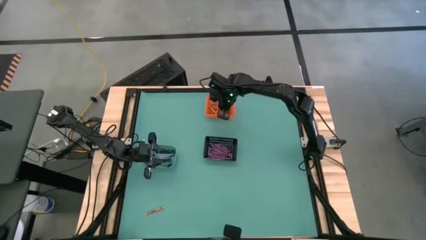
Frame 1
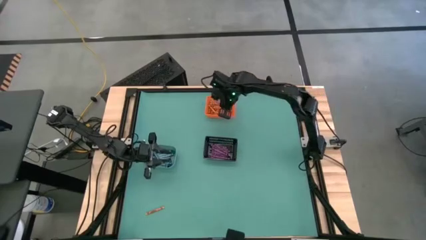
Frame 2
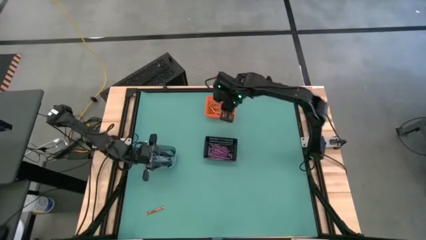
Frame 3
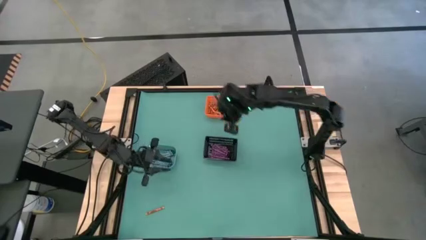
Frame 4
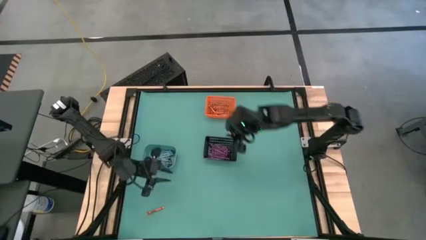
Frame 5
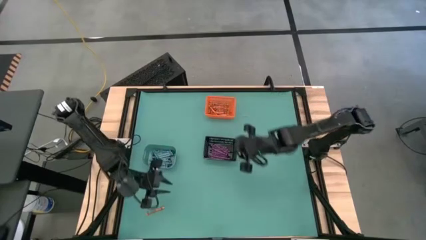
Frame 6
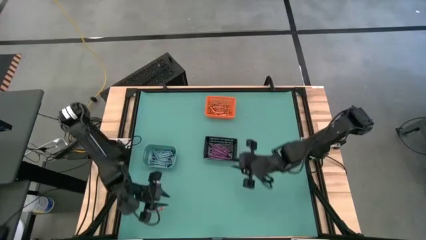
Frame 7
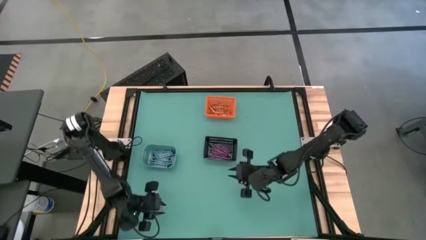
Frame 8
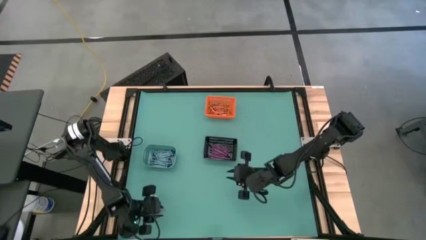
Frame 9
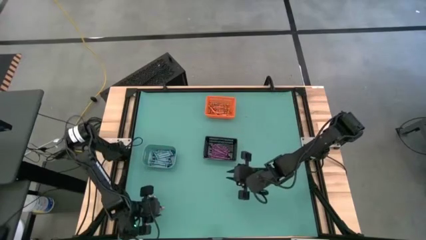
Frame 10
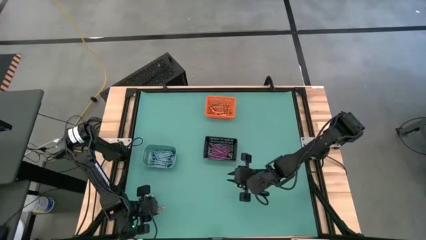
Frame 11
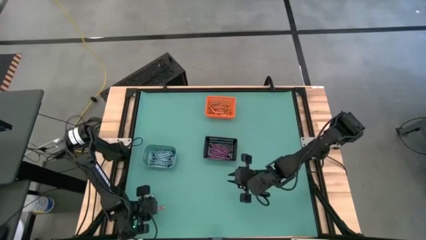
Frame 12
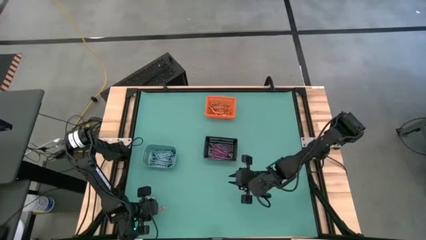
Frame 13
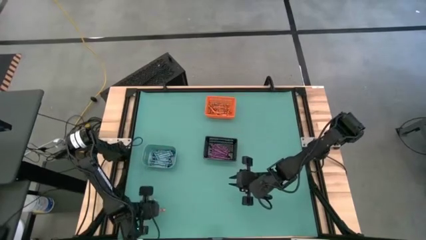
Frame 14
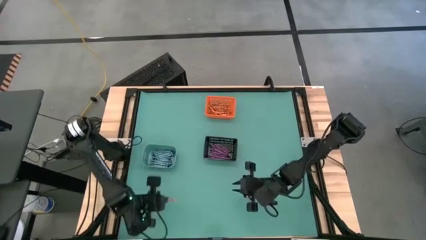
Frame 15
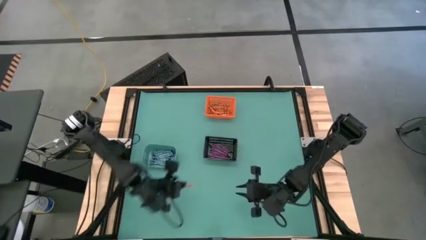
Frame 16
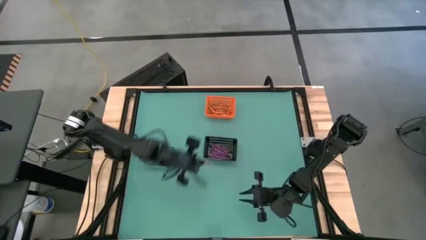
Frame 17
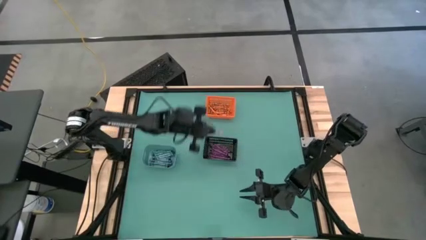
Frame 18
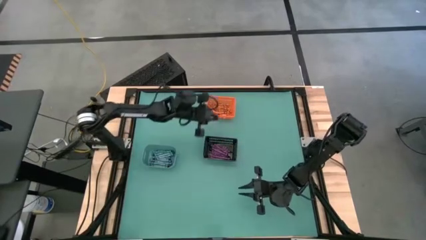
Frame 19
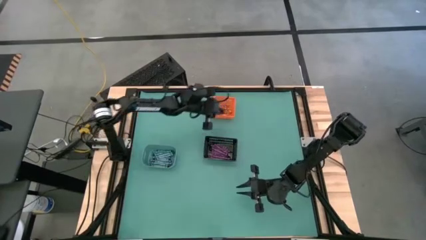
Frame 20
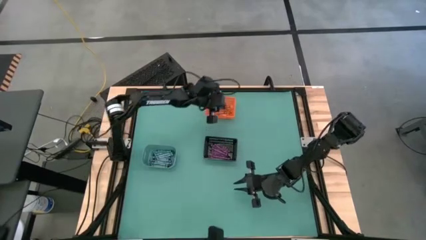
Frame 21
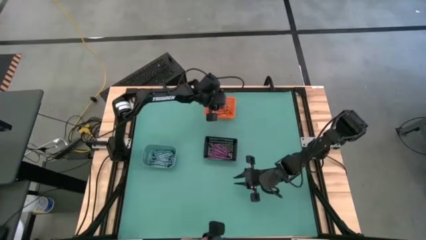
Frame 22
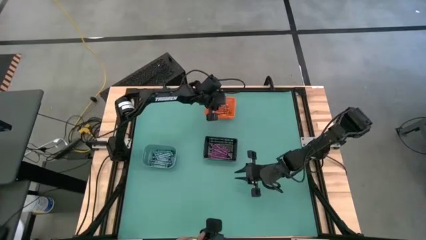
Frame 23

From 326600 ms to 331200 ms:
Task: Sort crayons
Put the orange crayon into the orange bin

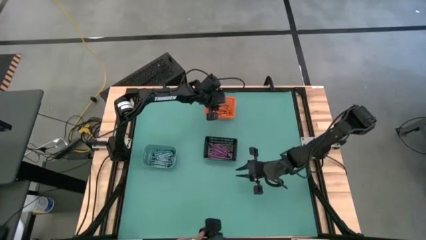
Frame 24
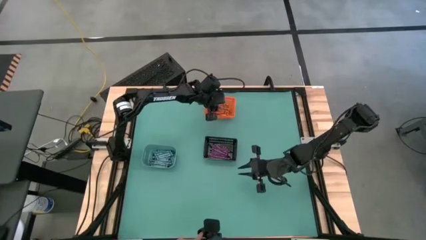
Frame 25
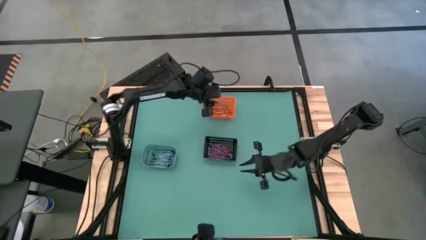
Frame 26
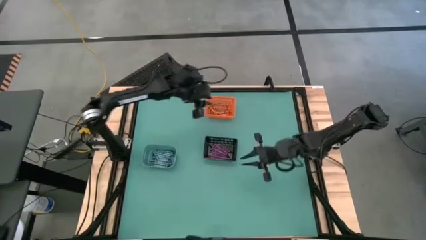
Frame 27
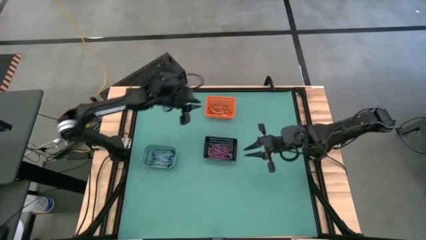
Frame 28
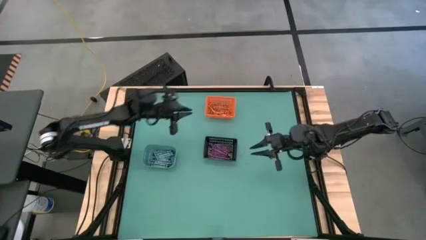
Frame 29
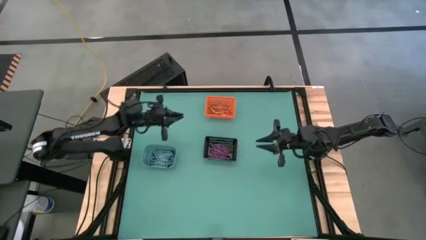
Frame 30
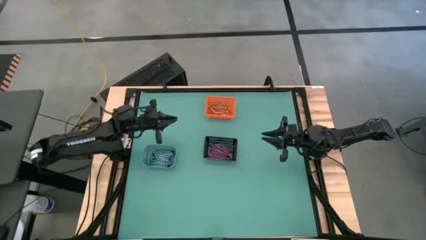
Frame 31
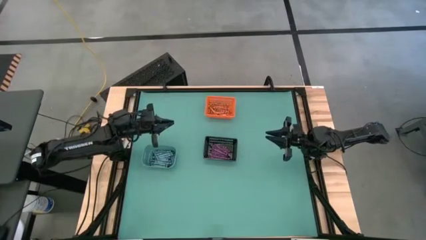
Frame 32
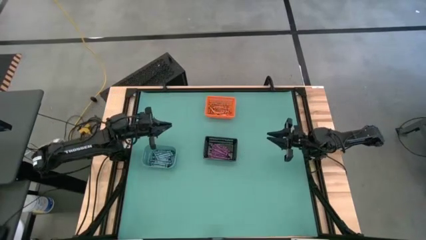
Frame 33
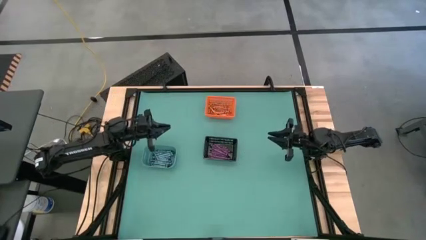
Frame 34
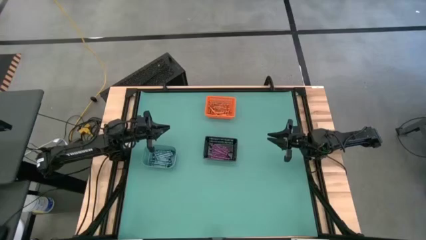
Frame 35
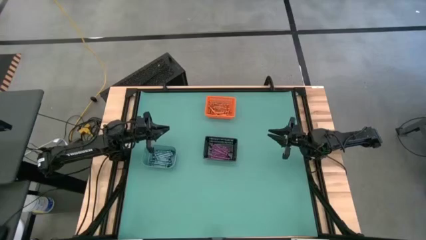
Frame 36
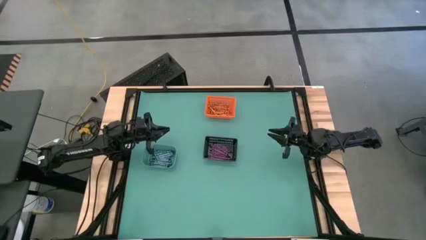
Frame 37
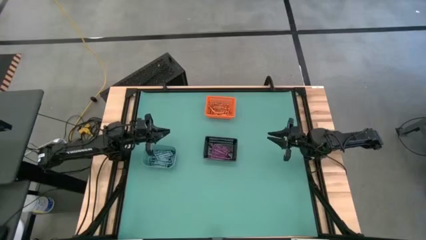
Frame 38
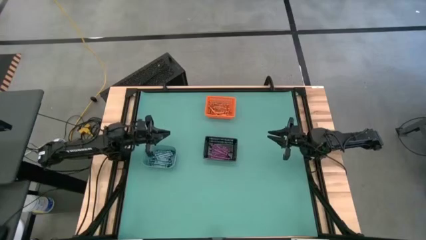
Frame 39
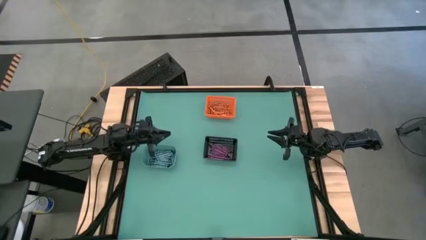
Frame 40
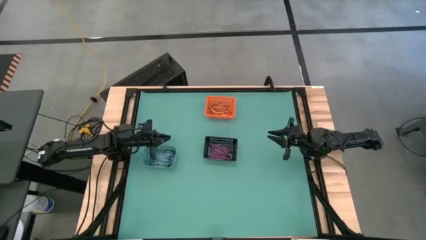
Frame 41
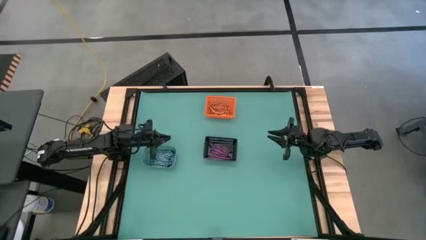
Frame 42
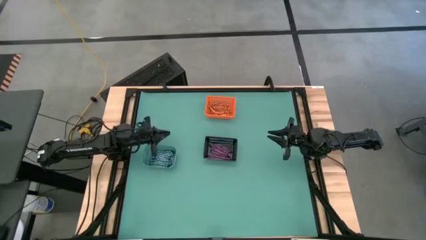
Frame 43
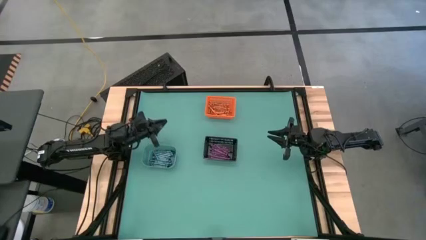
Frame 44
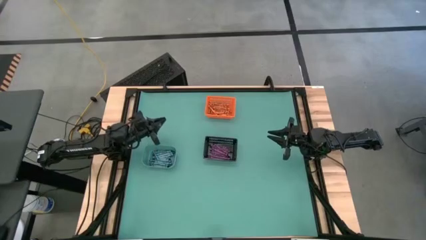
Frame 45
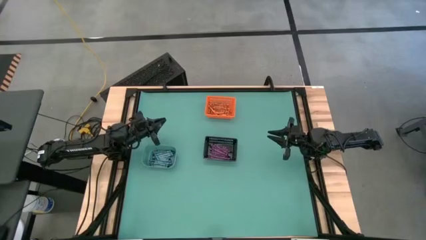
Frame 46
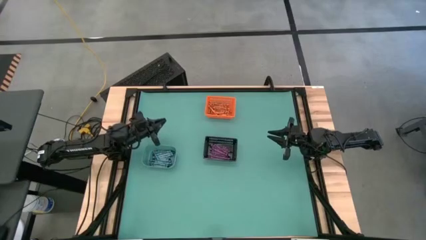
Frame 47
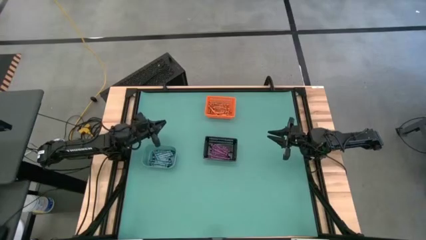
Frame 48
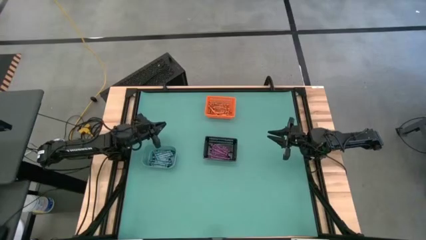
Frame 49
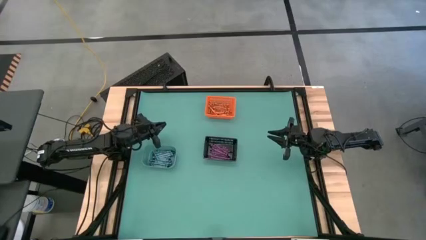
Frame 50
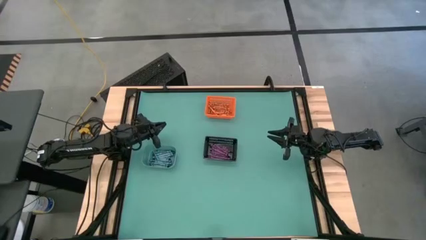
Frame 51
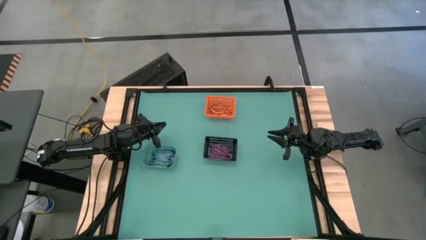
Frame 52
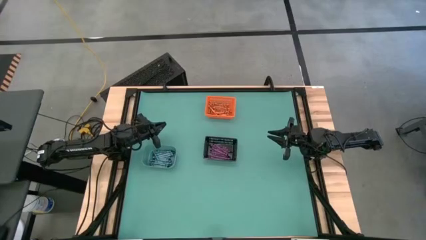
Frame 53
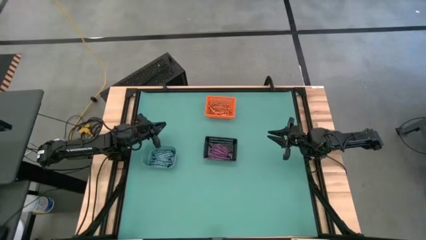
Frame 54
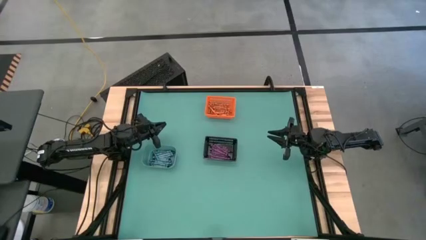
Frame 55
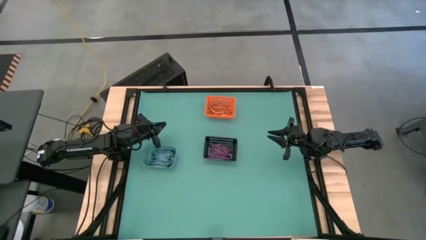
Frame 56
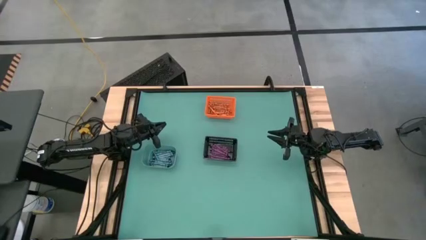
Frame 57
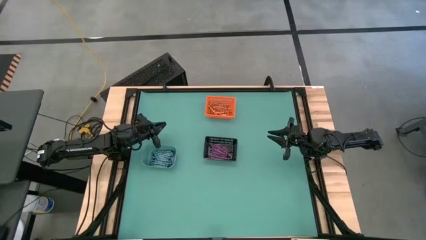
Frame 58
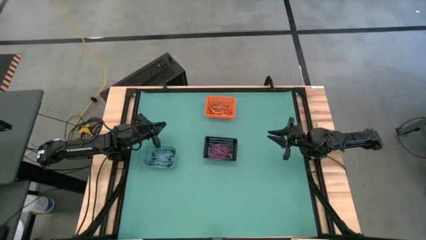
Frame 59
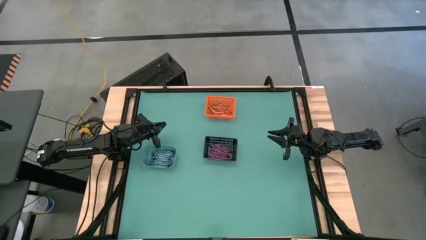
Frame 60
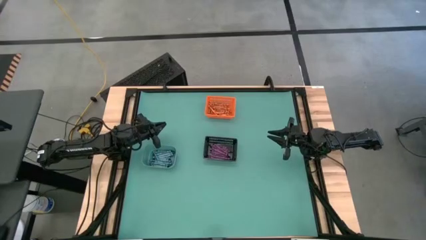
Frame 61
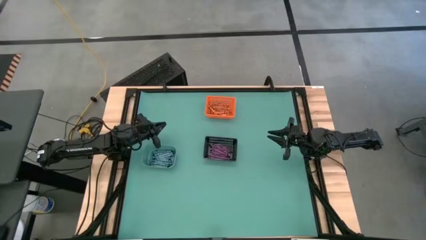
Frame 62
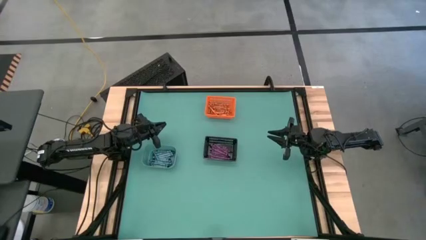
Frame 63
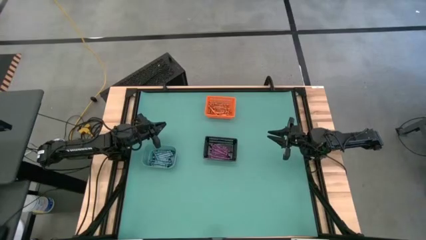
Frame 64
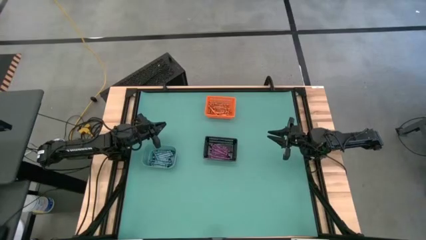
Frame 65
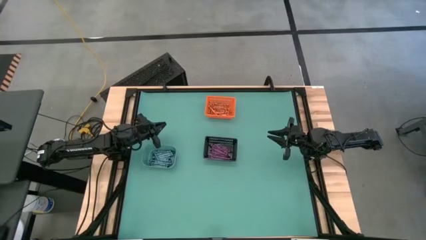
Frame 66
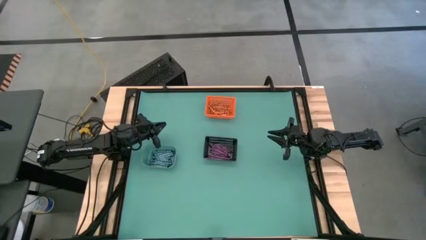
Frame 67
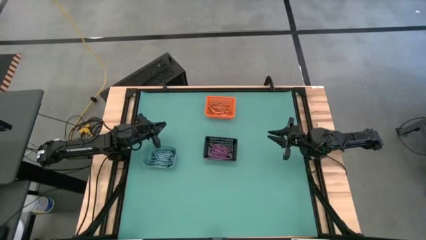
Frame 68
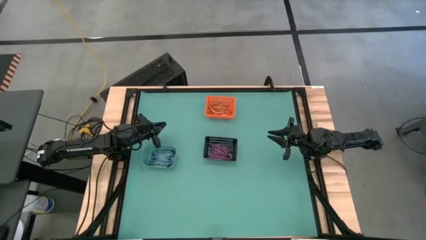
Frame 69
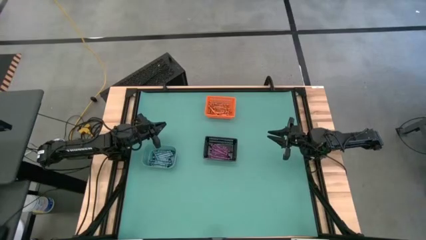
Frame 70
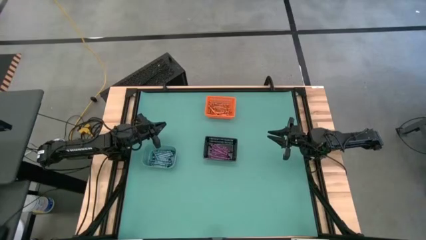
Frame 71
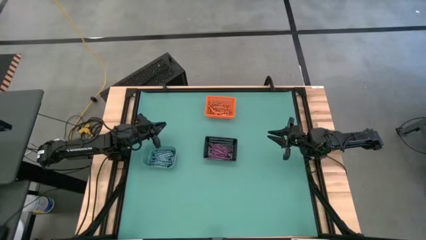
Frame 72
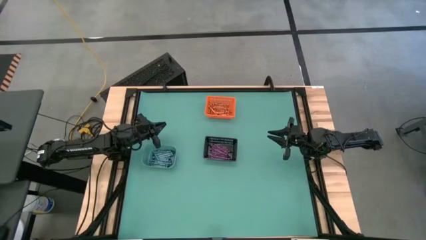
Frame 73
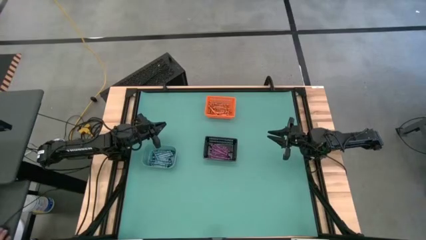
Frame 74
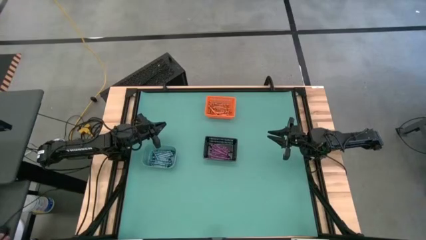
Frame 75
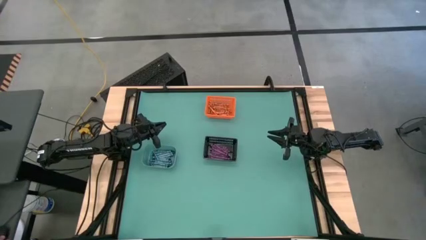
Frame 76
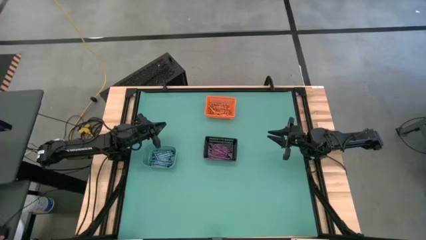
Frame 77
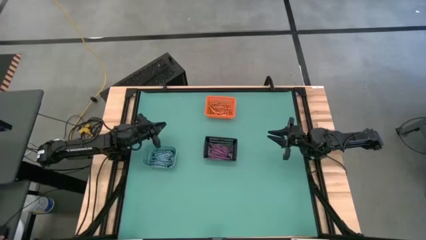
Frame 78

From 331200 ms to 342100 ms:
Return to Home Position

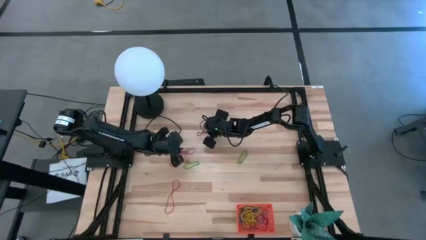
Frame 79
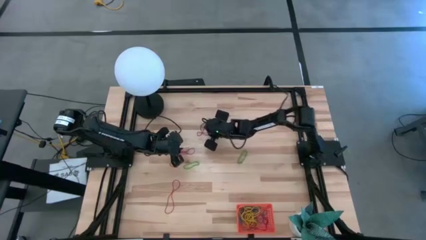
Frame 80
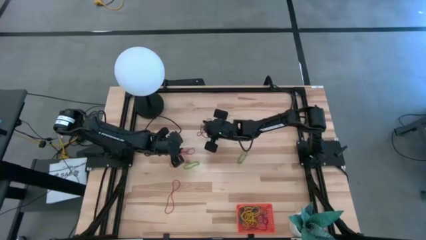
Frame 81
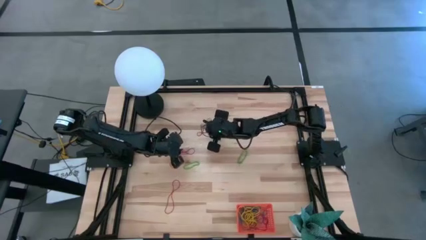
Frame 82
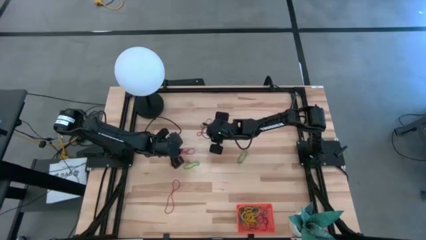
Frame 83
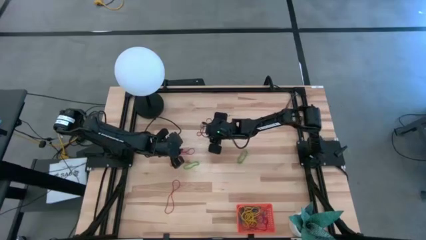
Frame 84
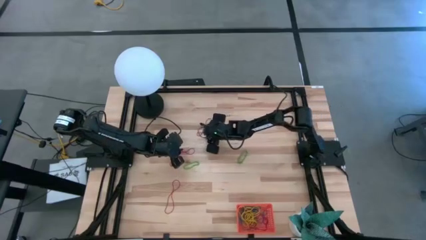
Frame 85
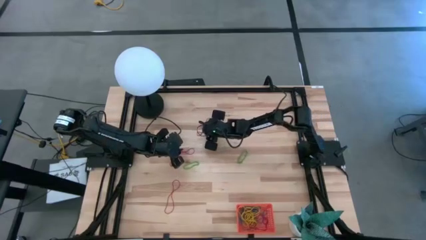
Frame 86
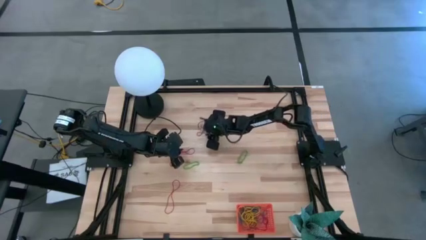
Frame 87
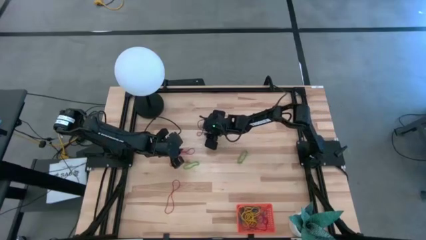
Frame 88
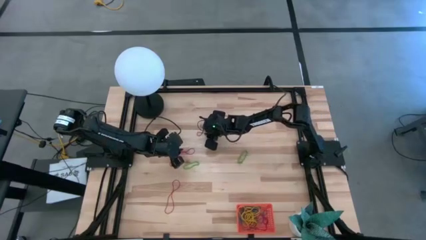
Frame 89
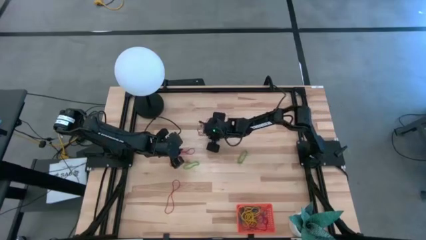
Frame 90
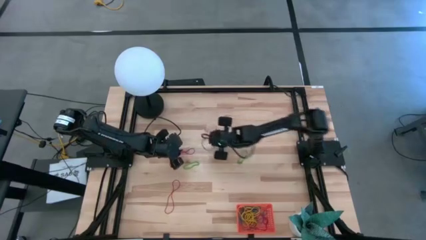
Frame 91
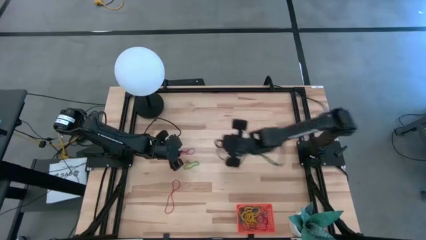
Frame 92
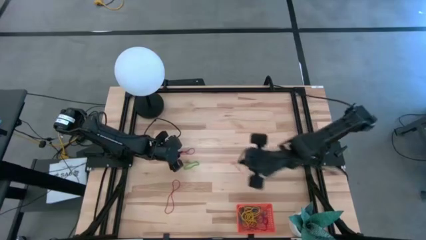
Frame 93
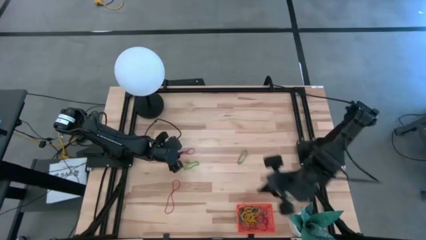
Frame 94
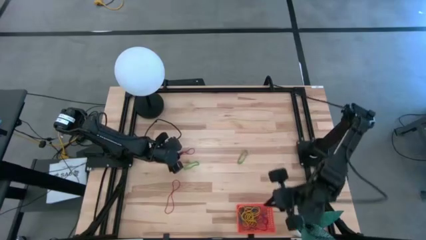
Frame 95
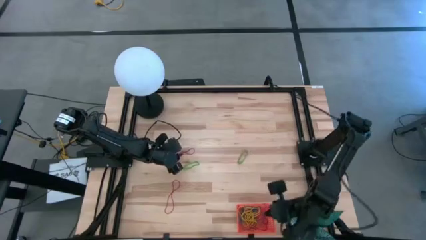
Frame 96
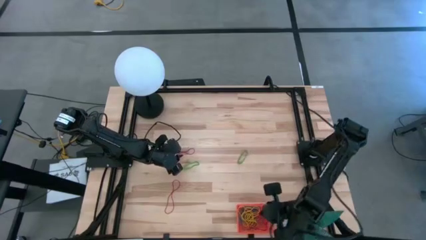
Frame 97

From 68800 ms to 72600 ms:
Task: Pick and place items into bin
Put the red rubber band into the orange bin
